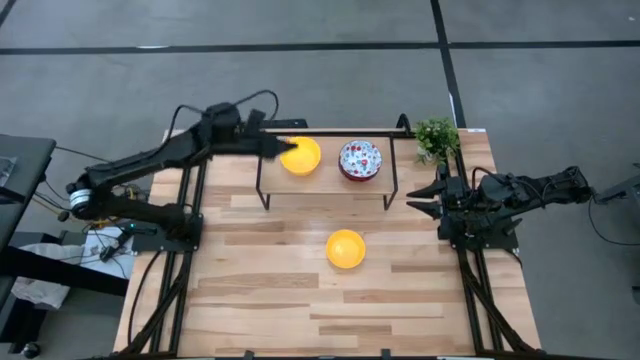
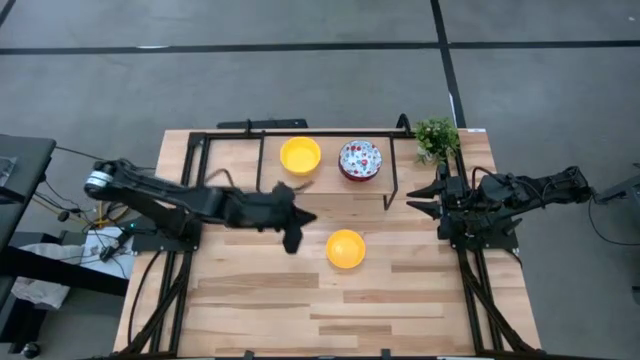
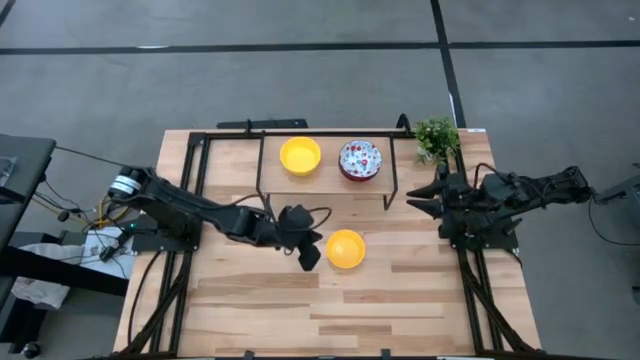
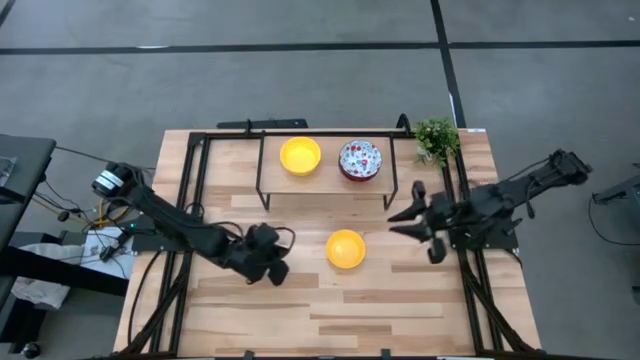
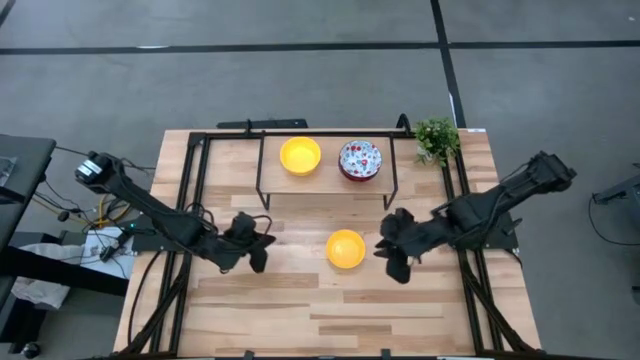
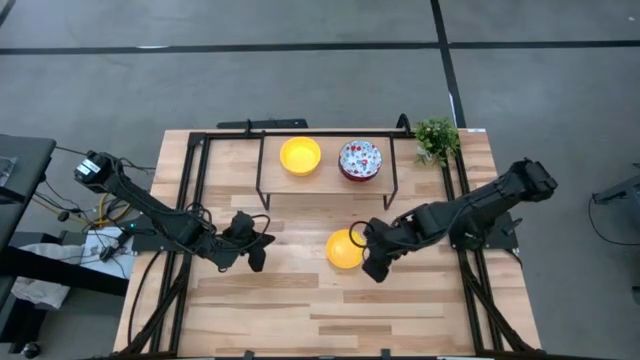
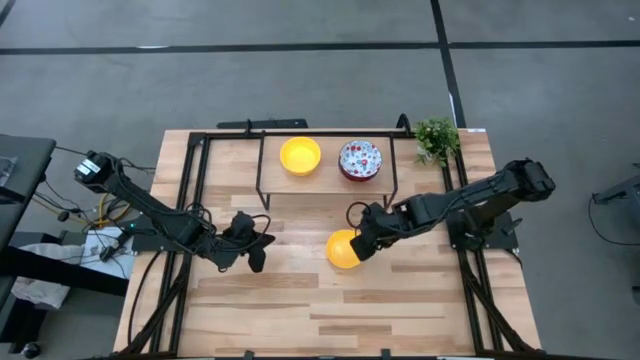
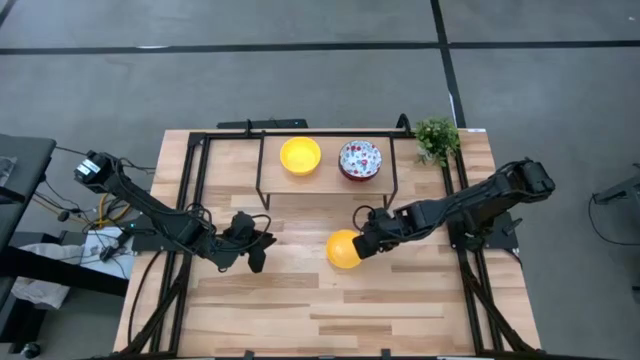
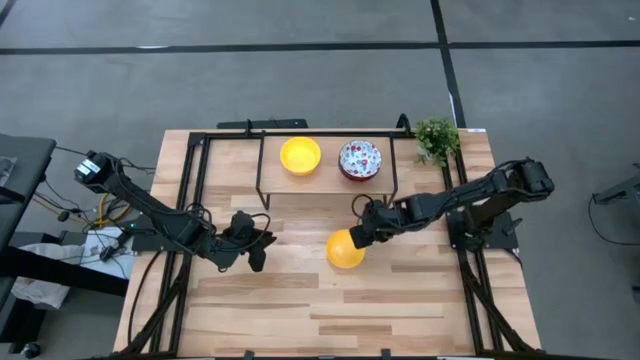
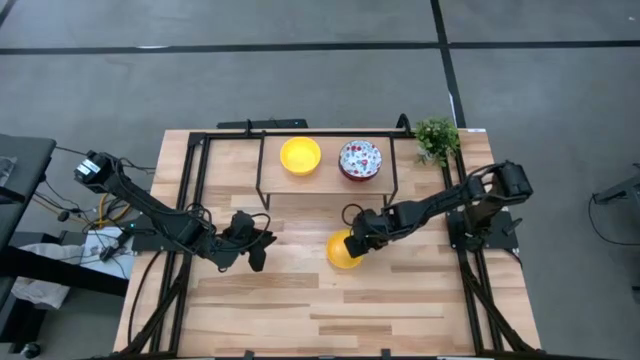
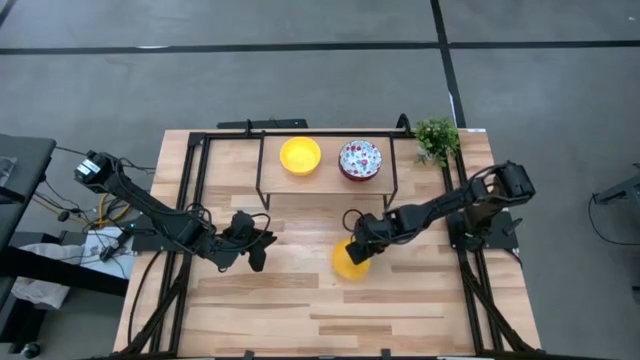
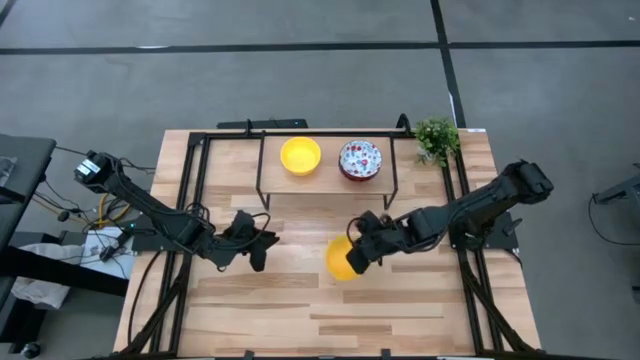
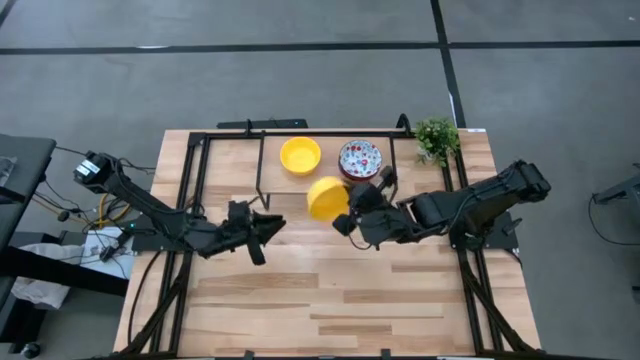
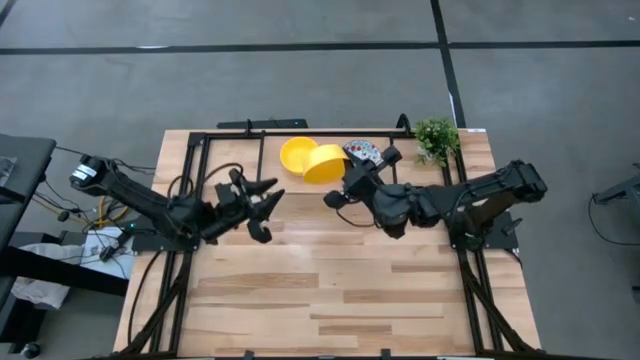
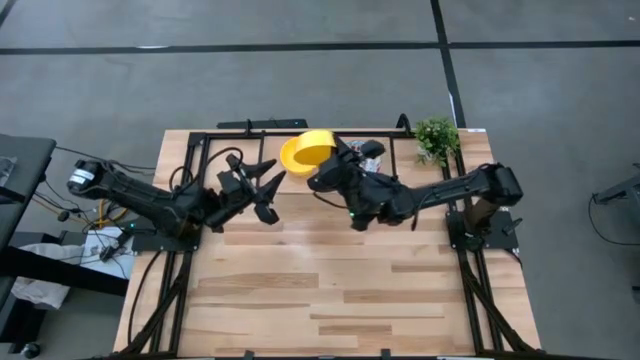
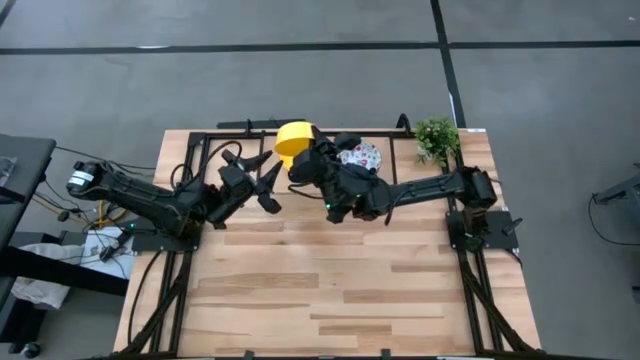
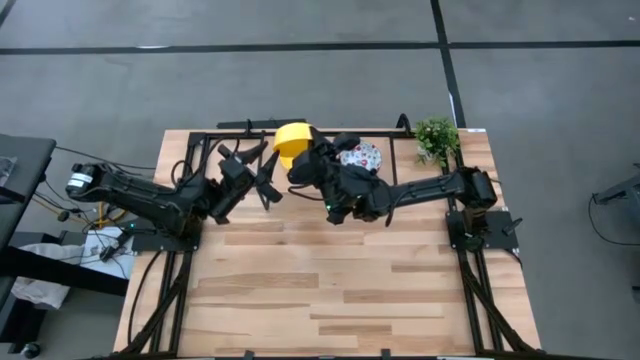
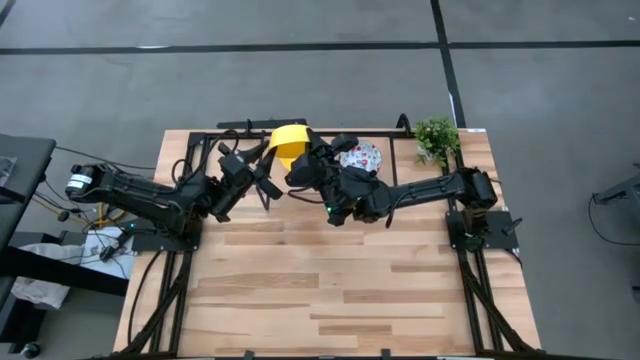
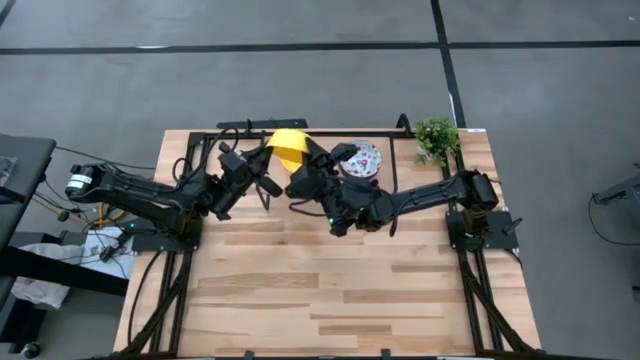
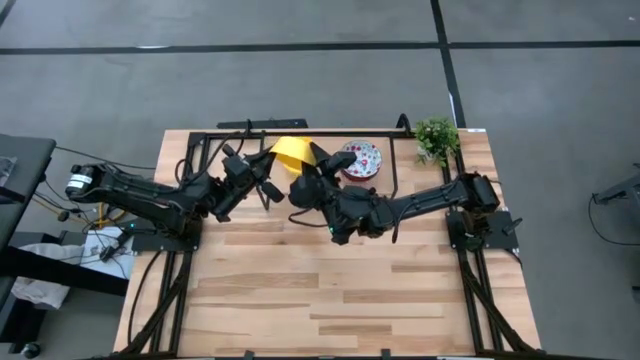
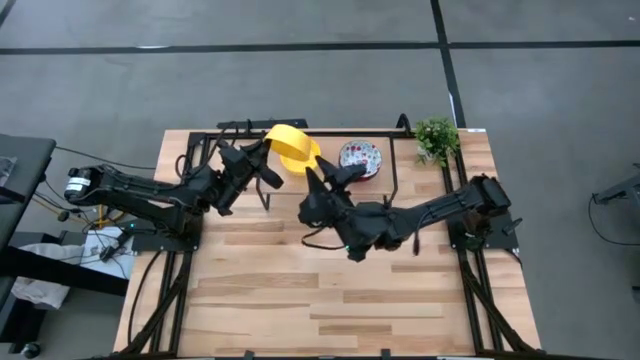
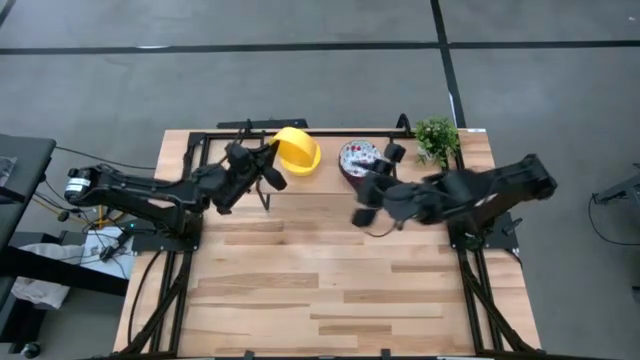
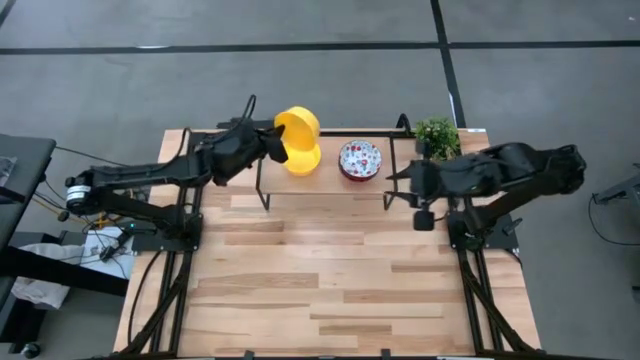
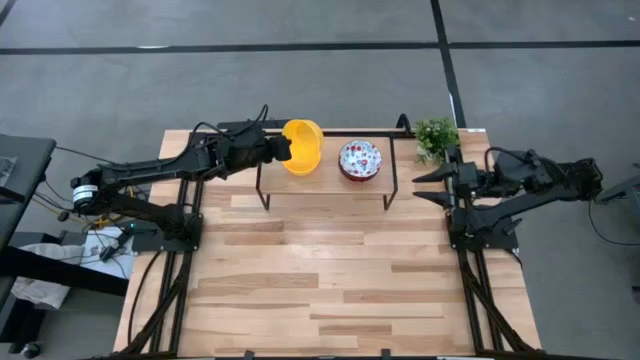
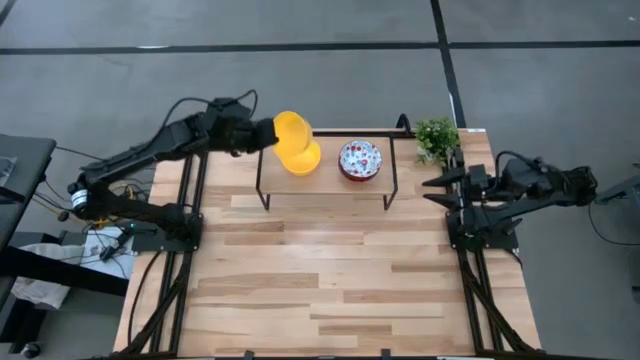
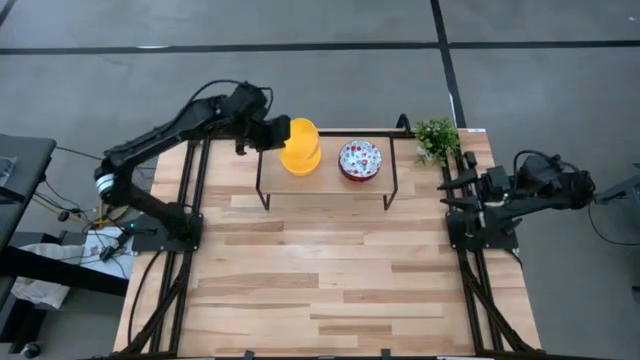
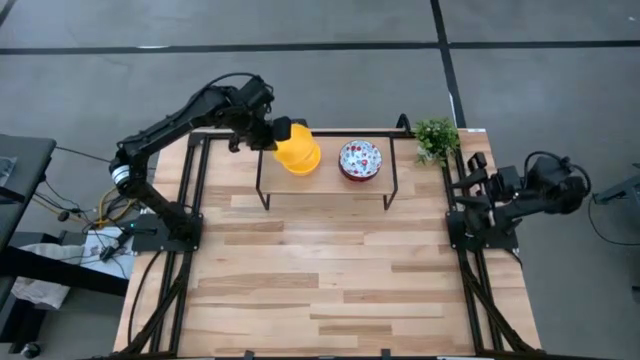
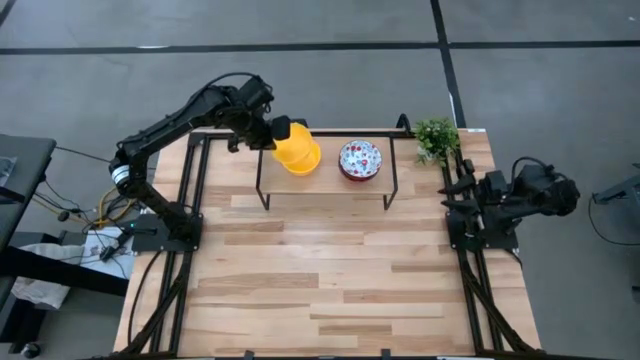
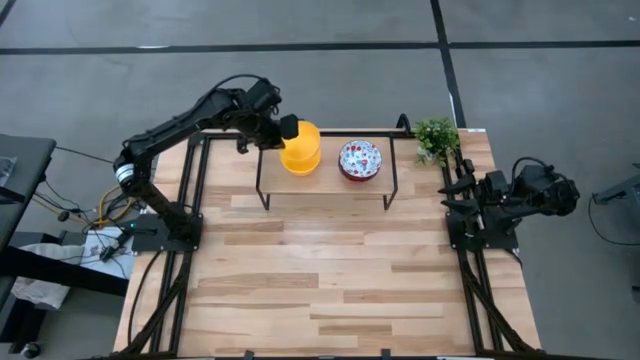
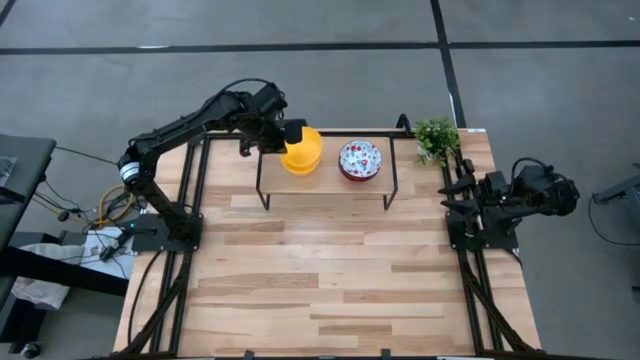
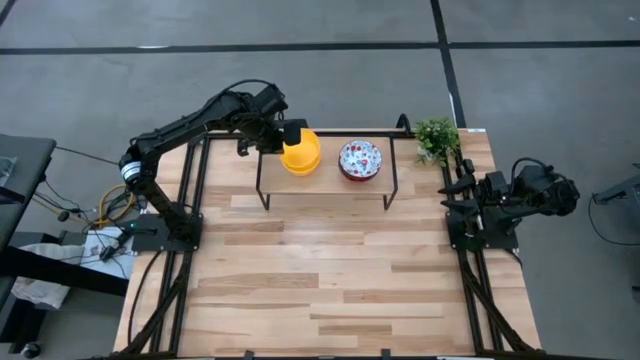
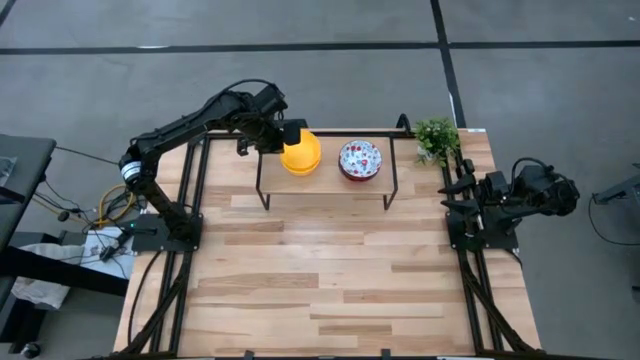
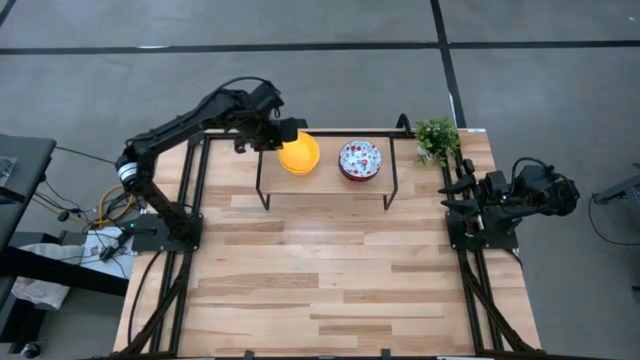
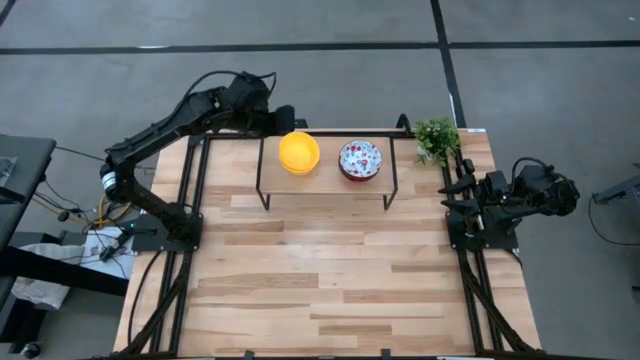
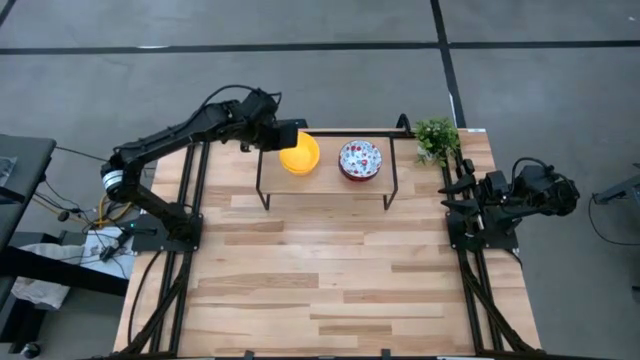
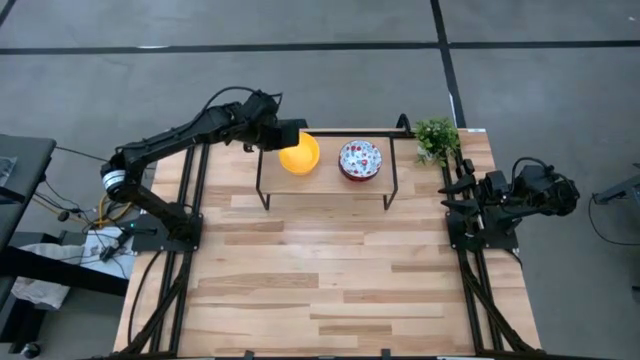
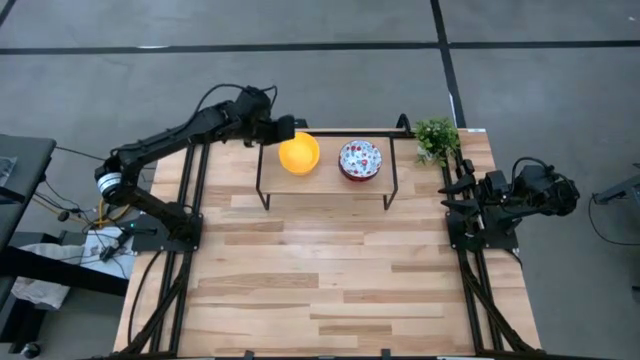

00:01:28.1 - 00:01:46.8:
Task: Pick & Place Mini bowls
Stack the yellow bowl on the yellow bowl on the shelf

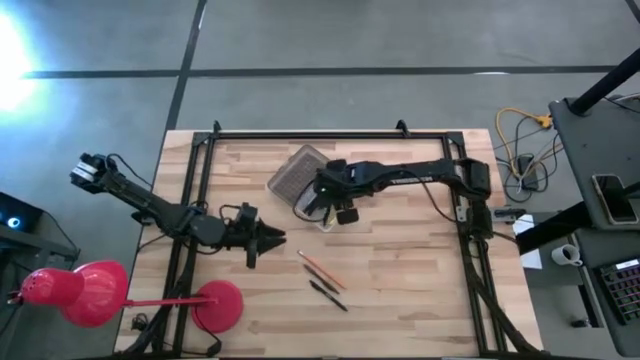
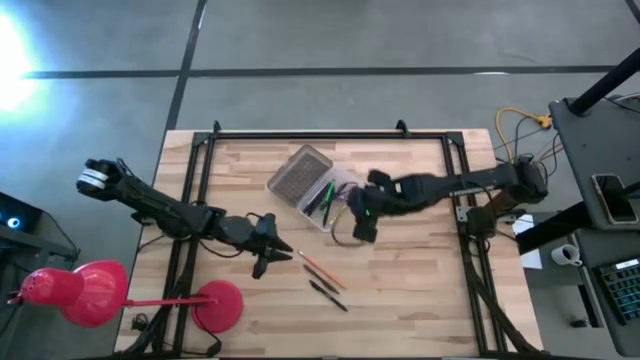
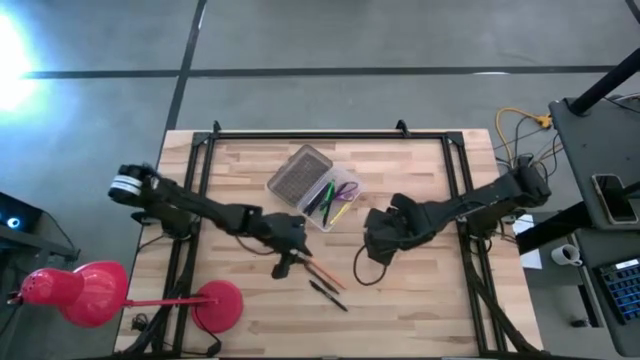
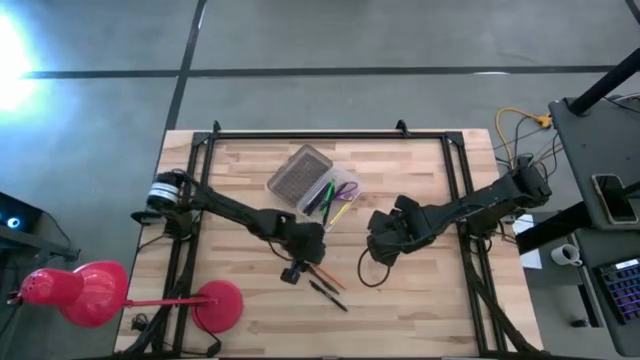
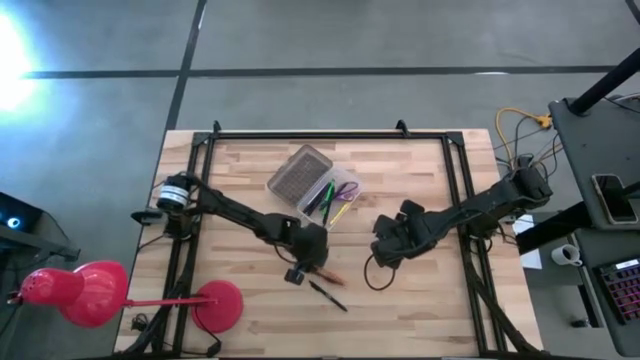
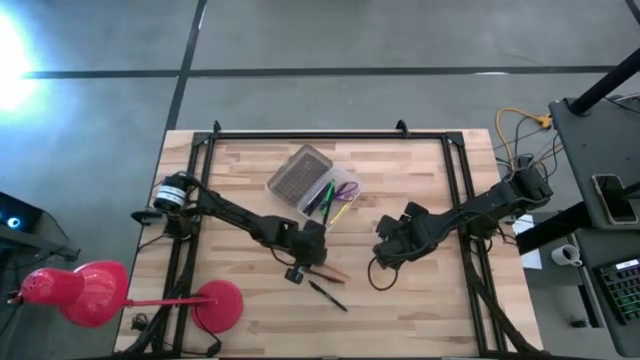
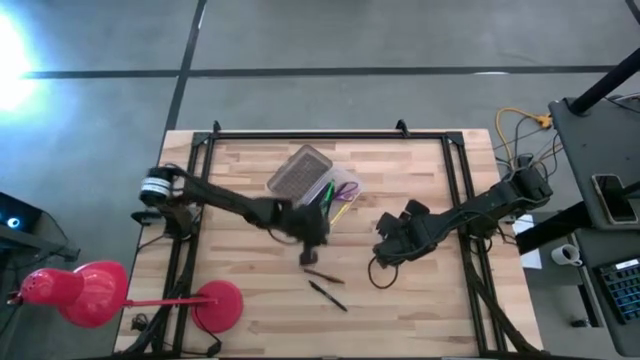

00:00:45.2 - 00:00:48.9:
Task: Pick & place school supplies into a supply box
Put the pencil into the supply box
